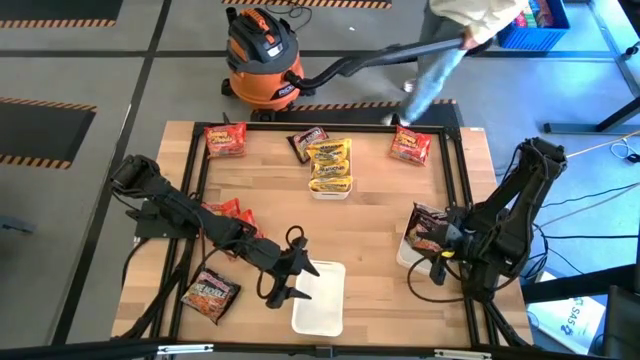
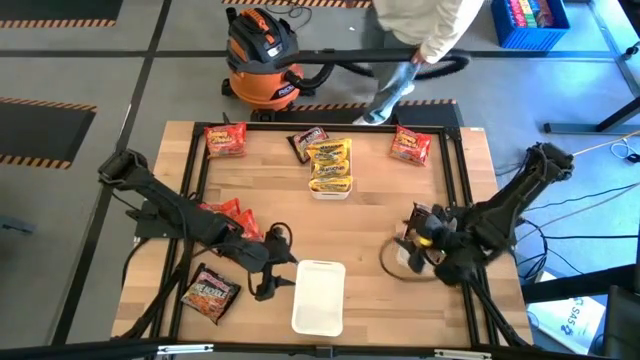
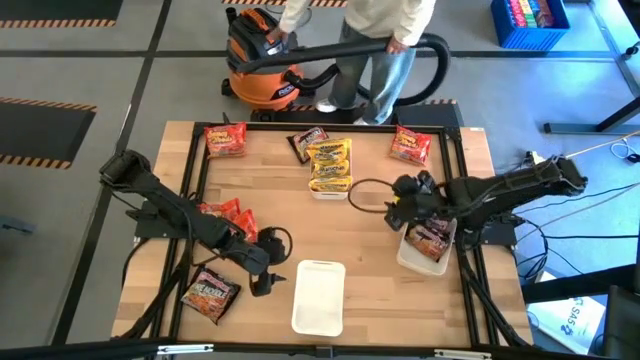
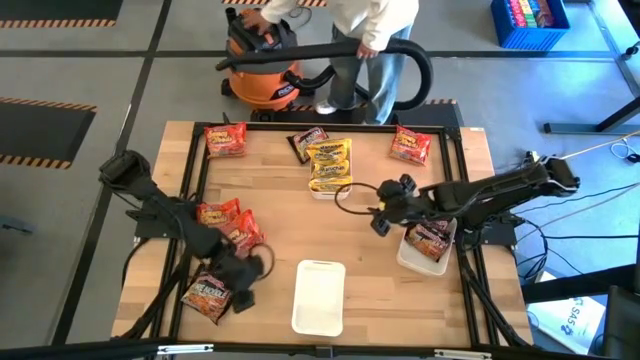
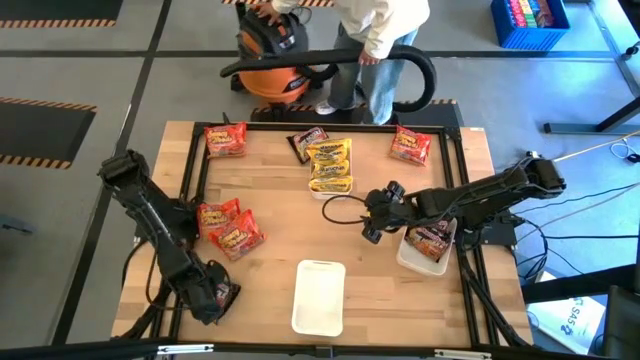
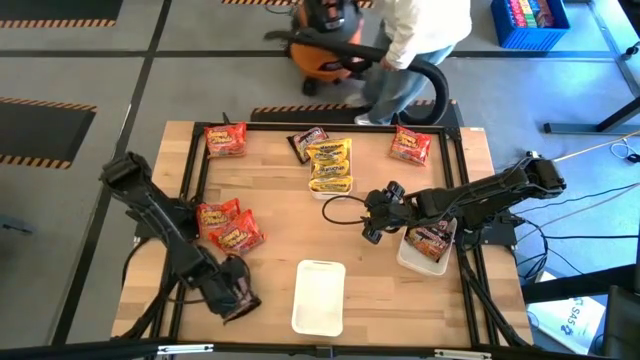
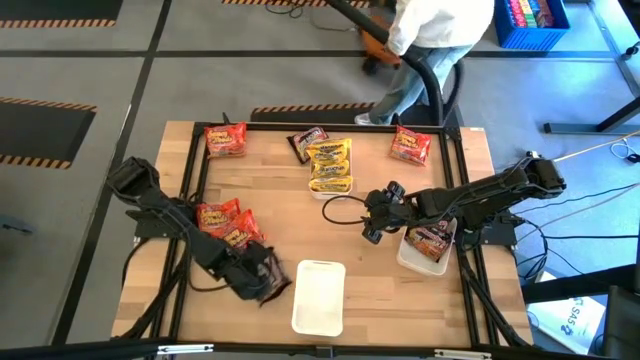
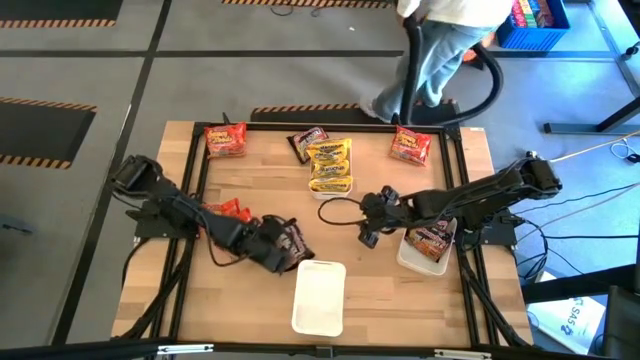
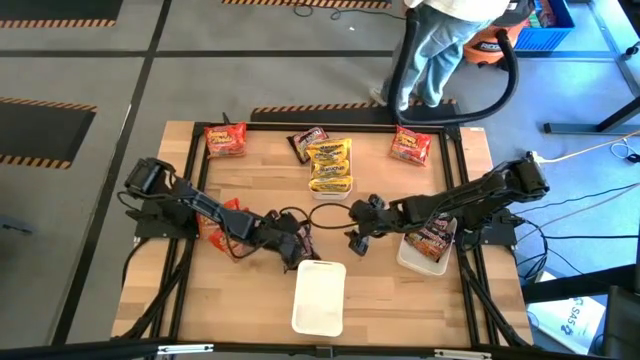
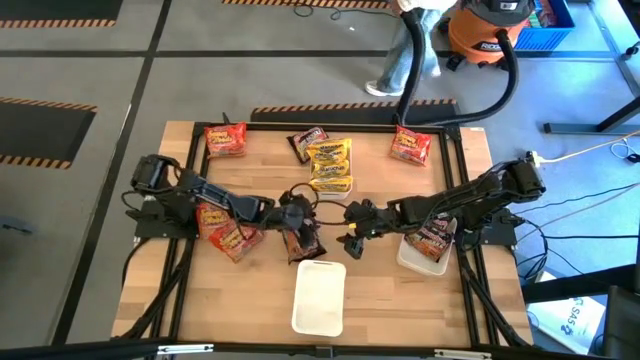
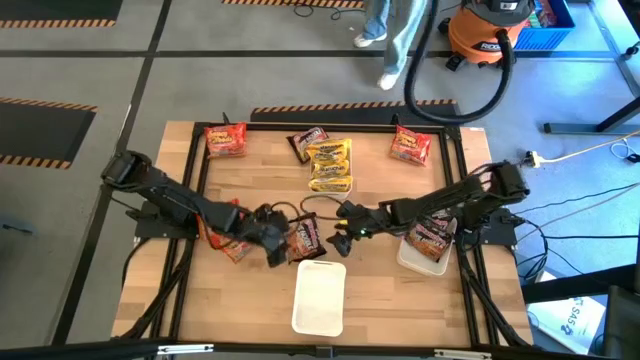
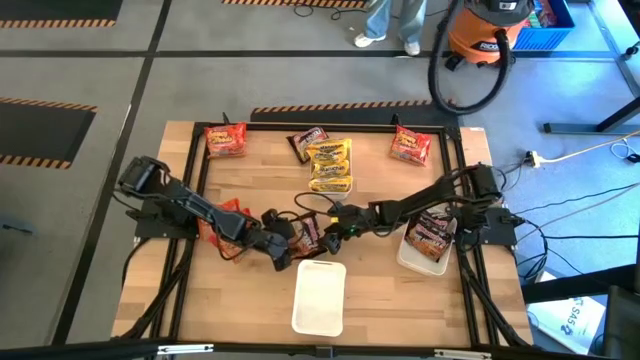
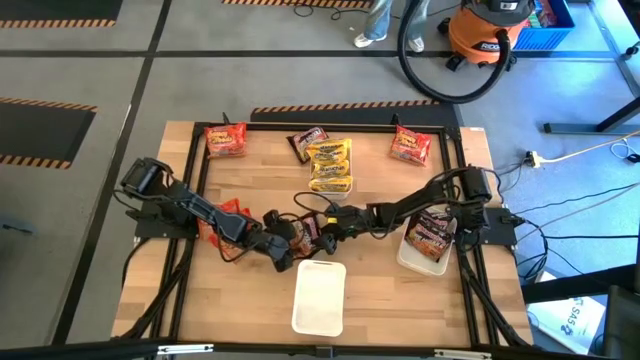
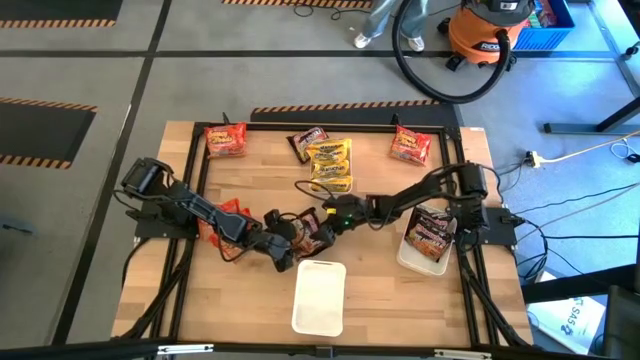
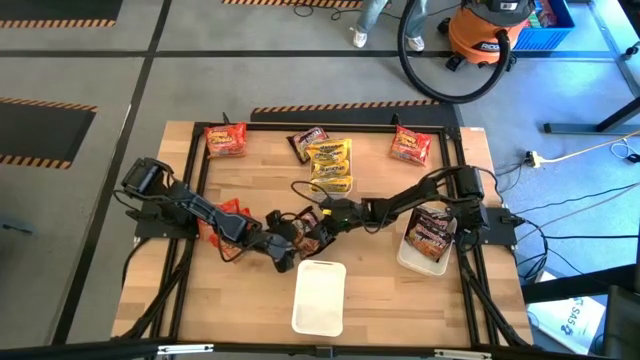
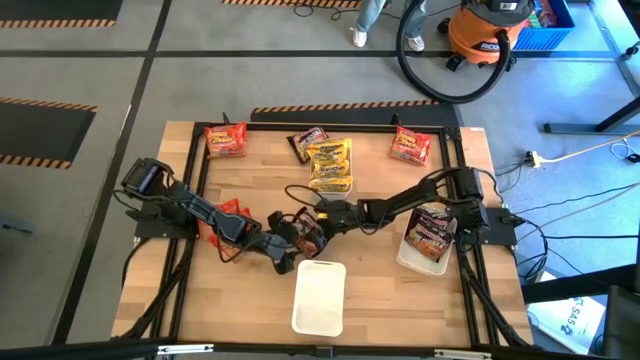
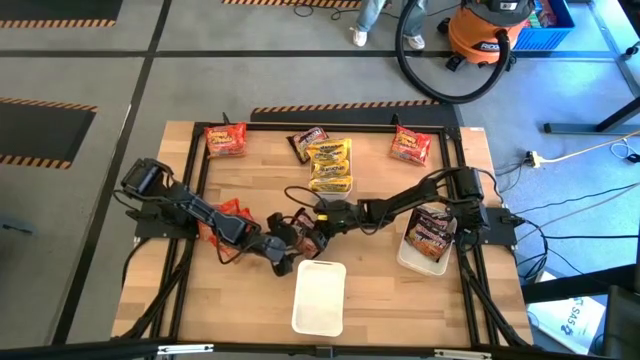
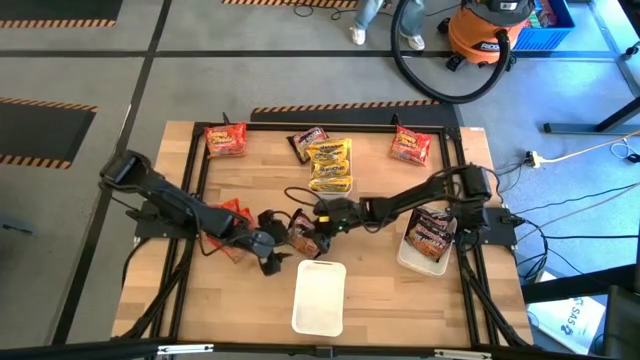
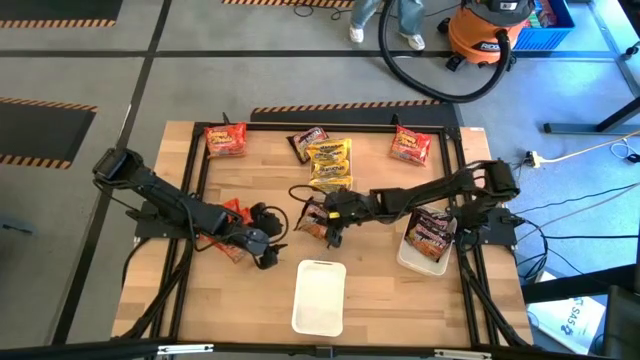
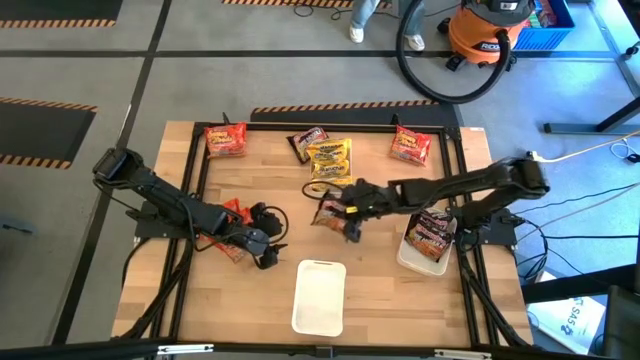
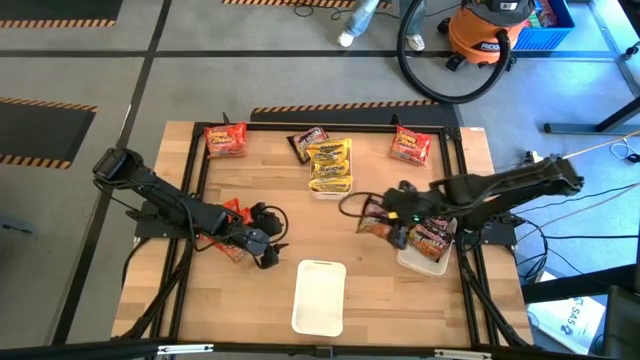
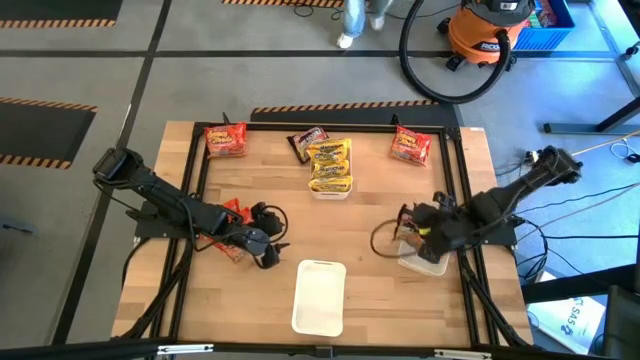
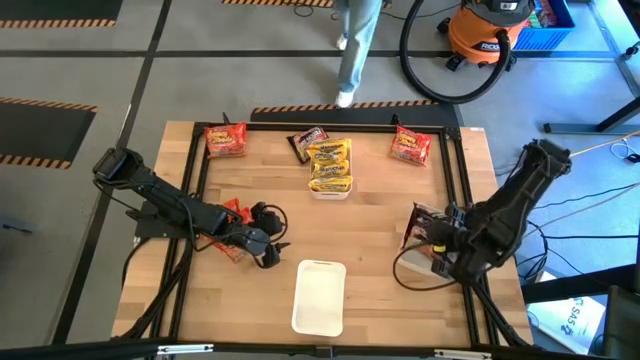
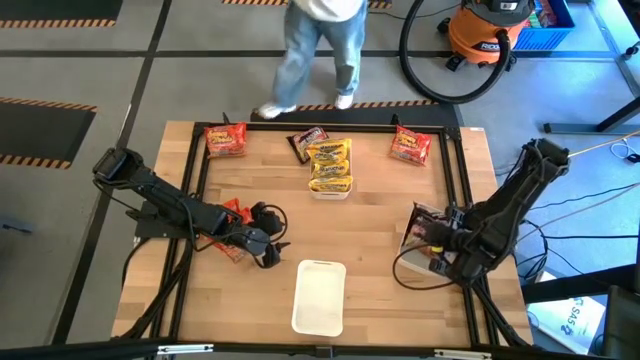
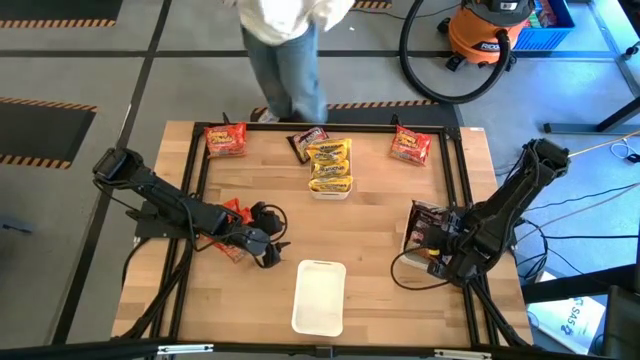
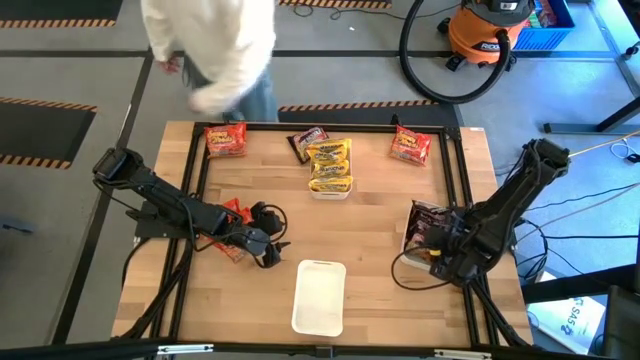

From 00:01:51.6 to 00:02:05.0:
Task: Sort Maruchan noodles
Put the bottom black noodle pack into the right white bin

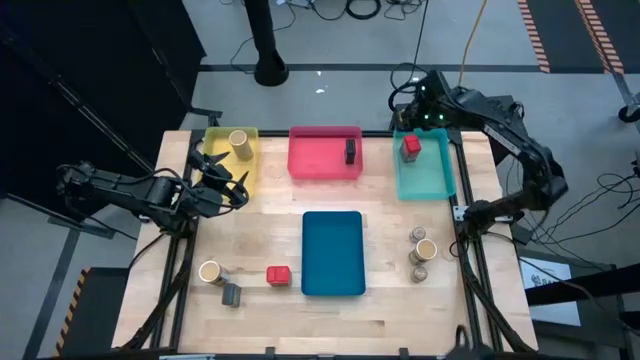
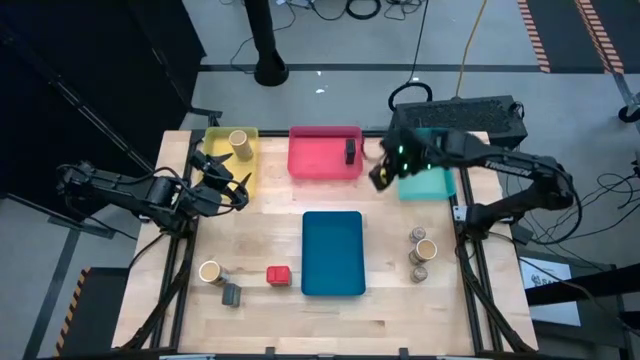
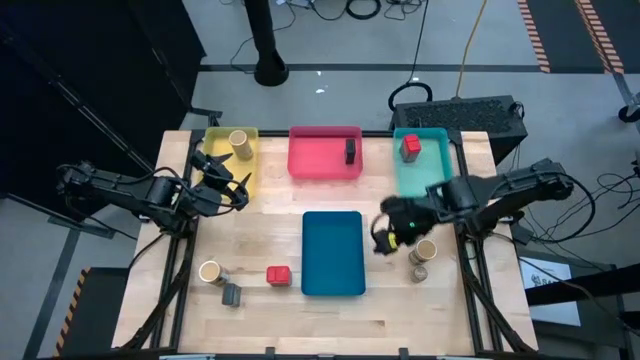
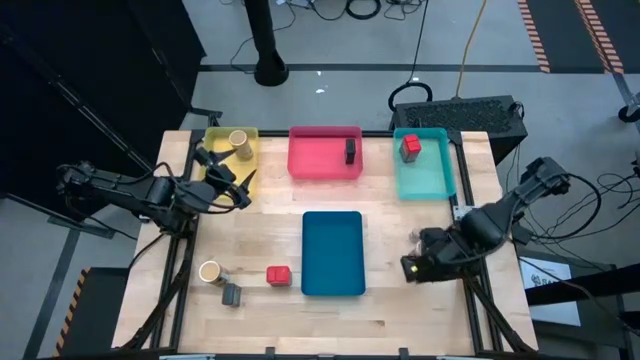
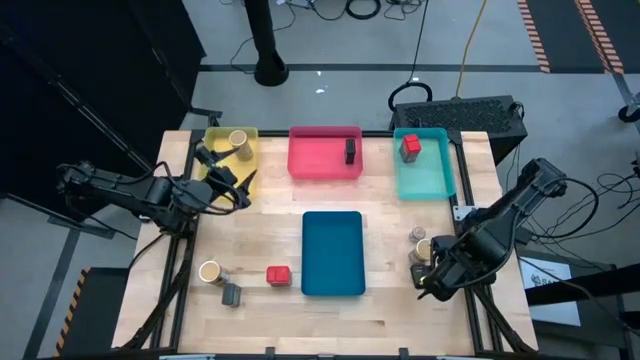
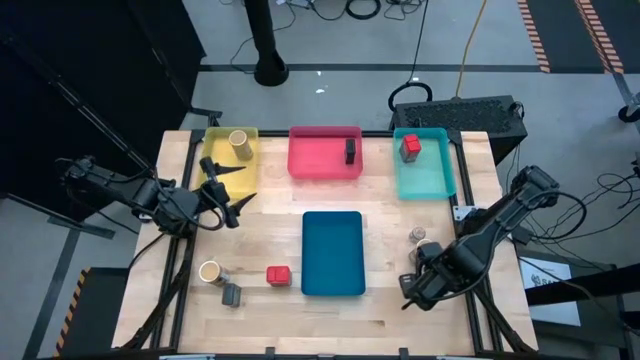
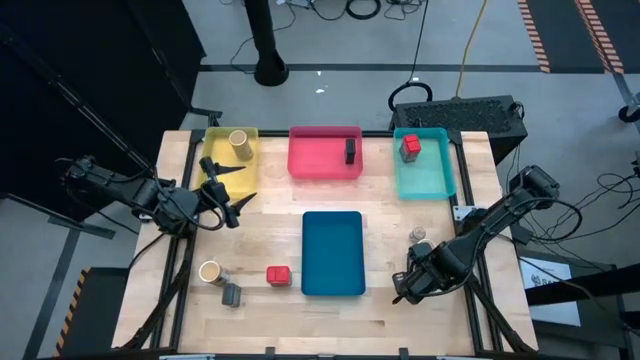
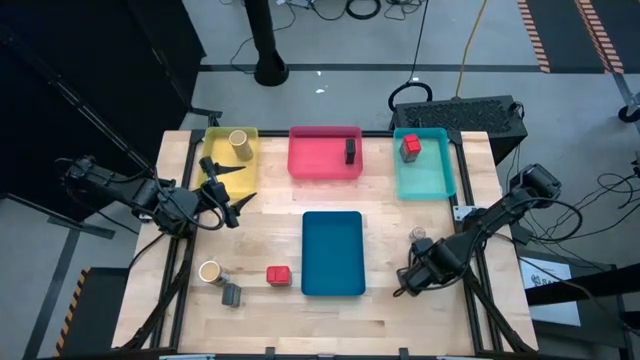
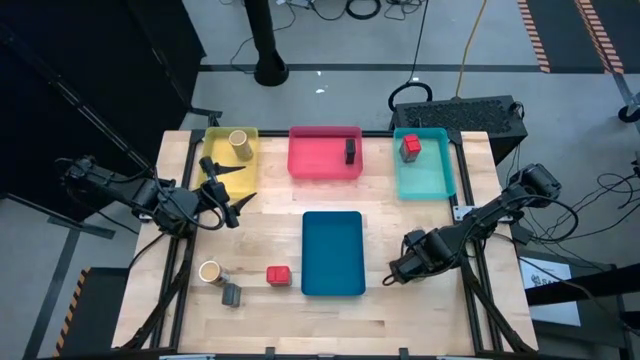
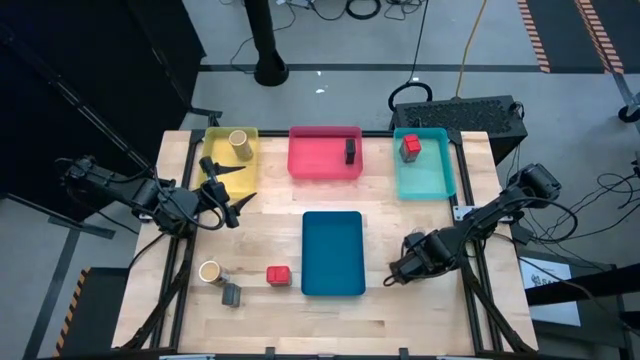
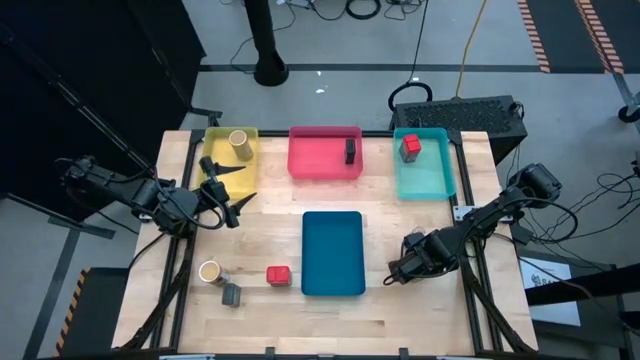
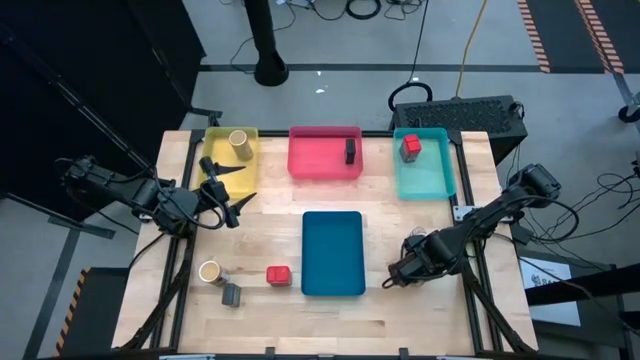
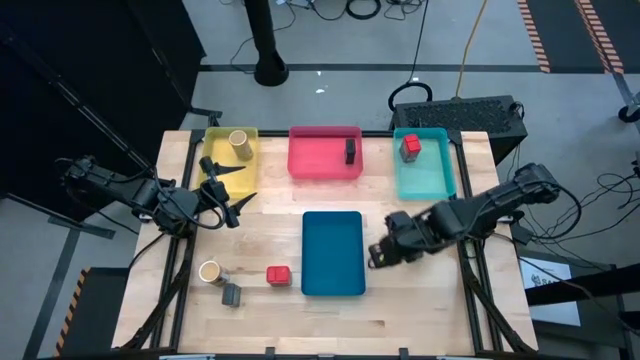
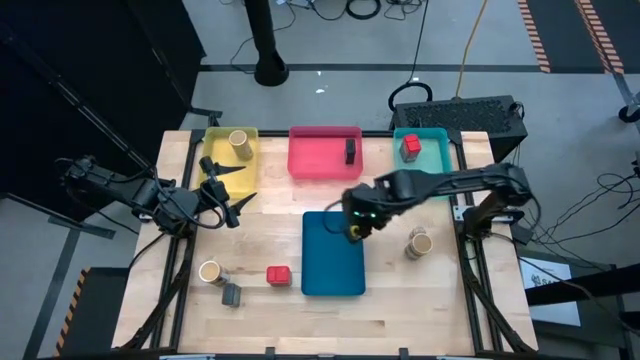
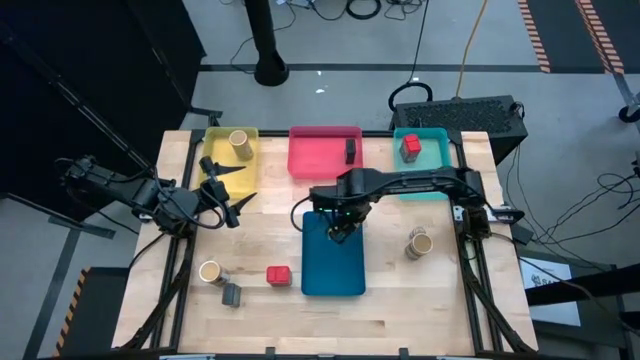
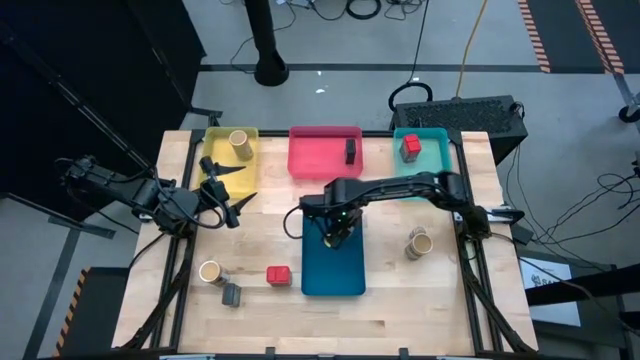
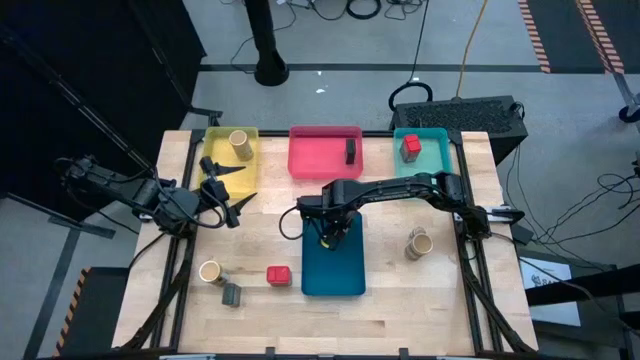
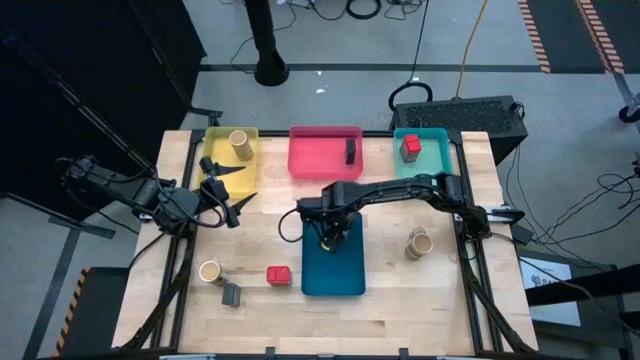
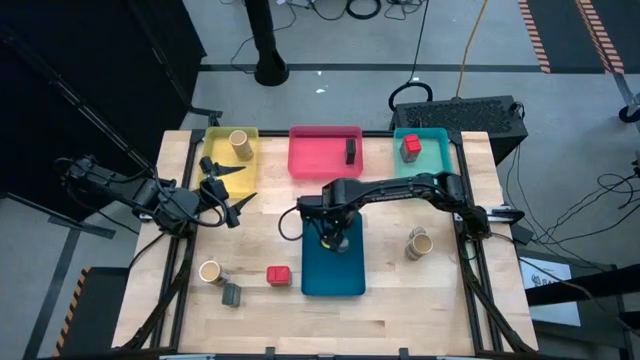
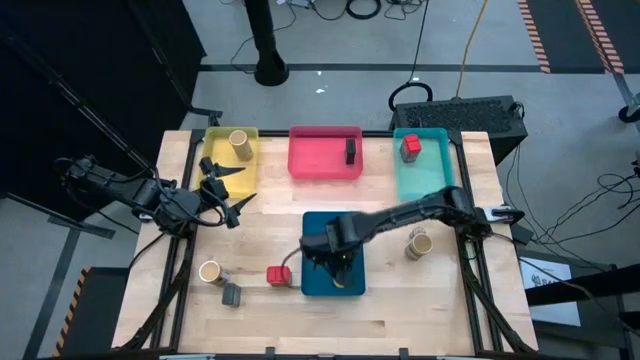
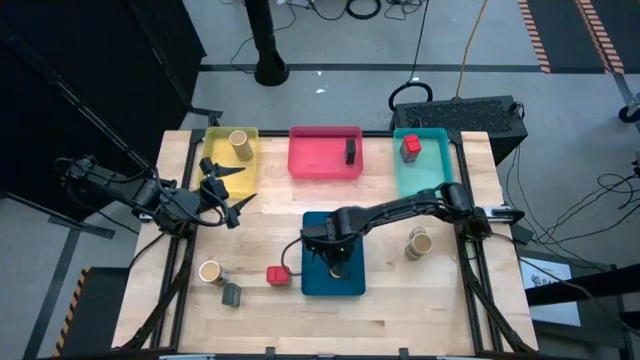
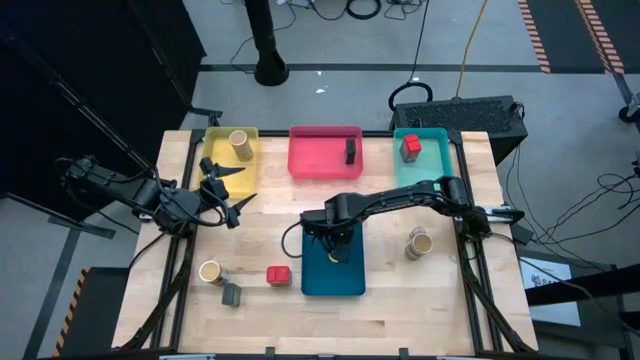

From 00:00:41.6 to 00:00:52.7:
Task: Sort spices by type
Put the bottom brown seasoning bottle into the blue bin
